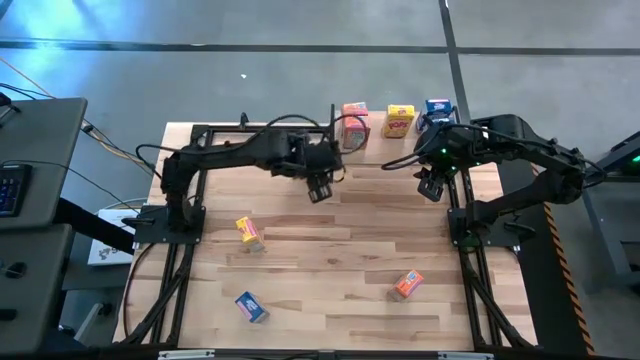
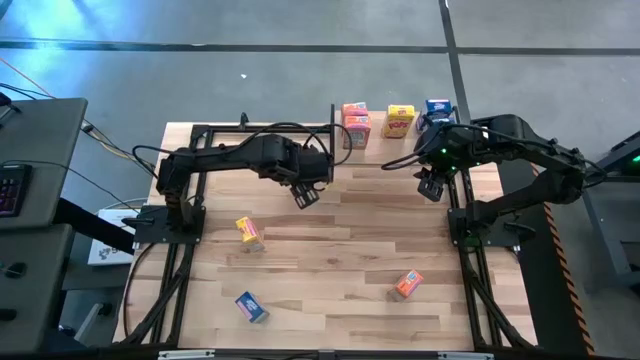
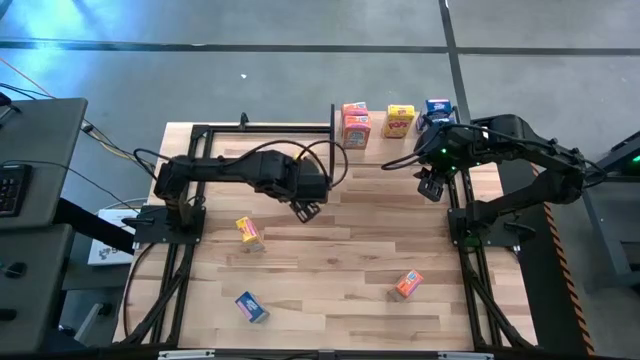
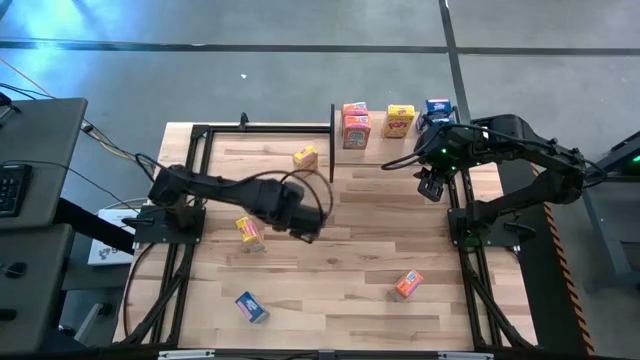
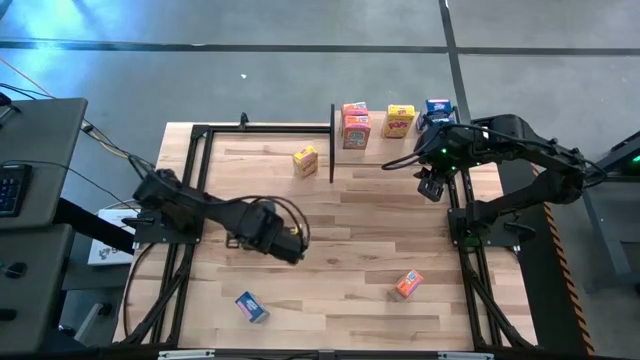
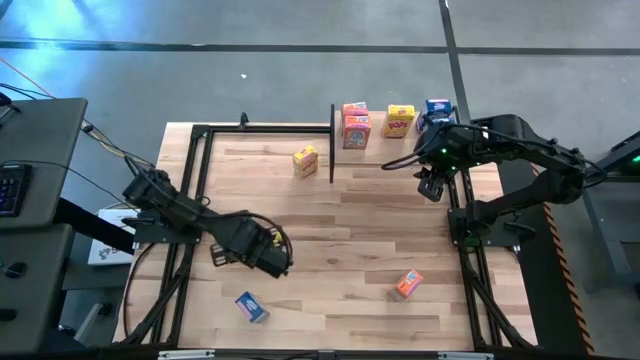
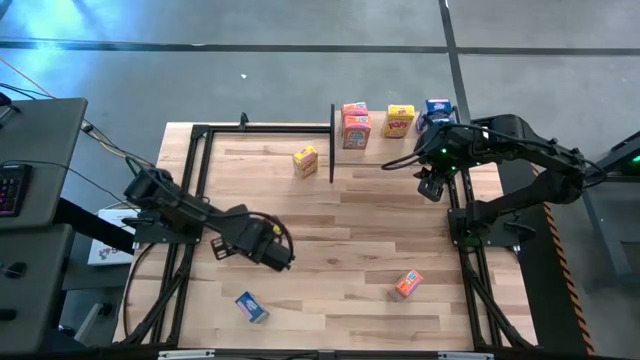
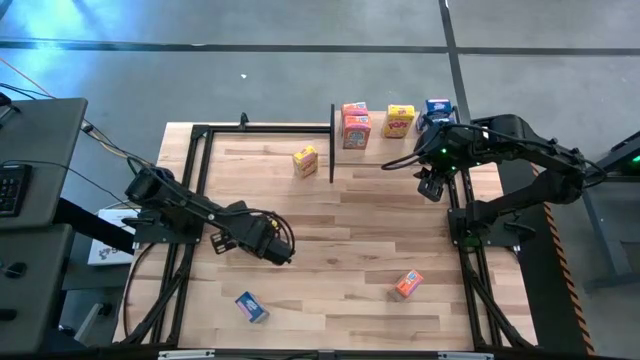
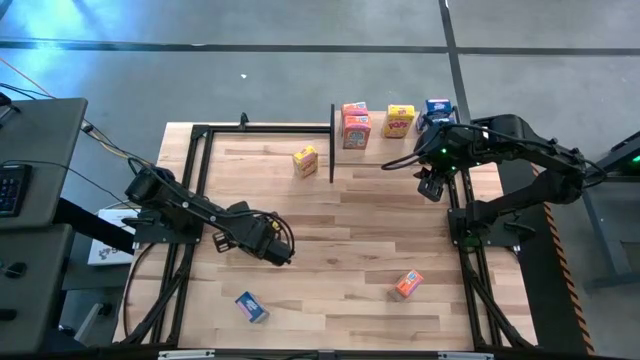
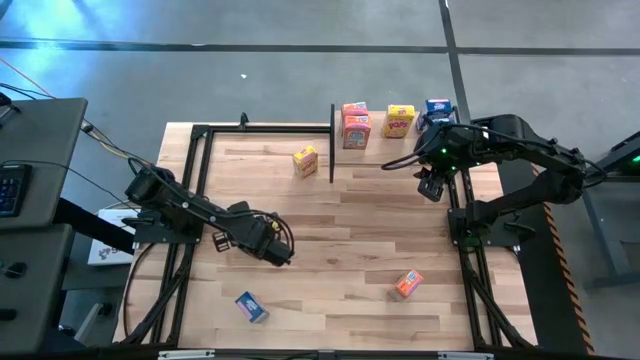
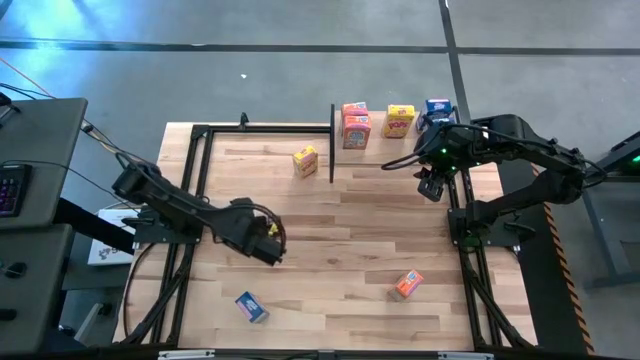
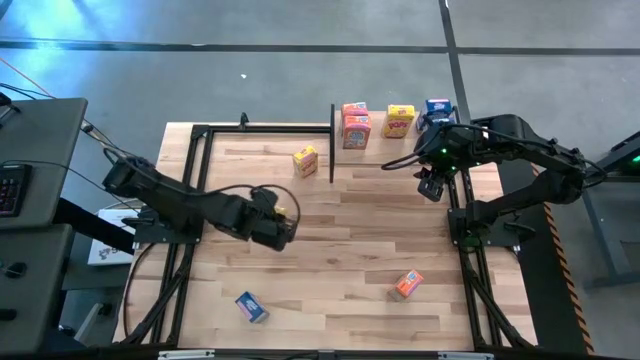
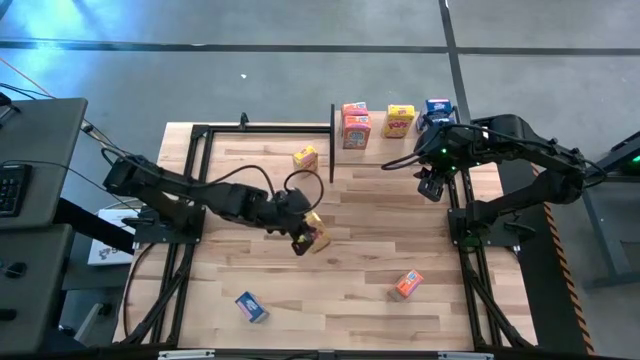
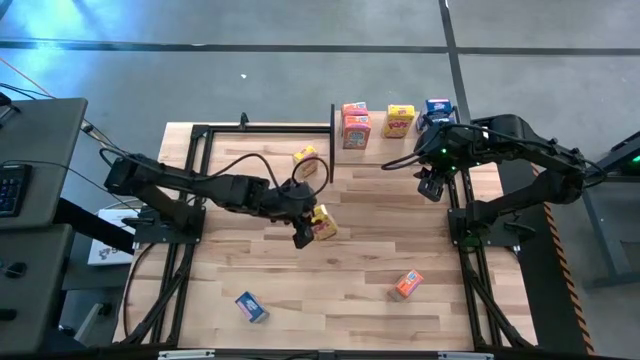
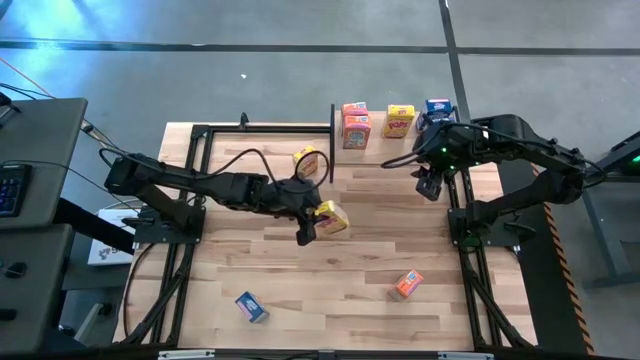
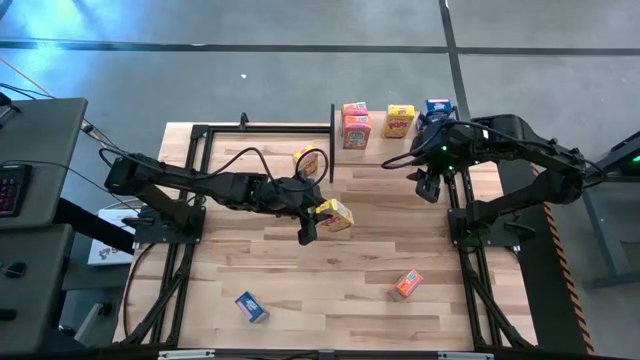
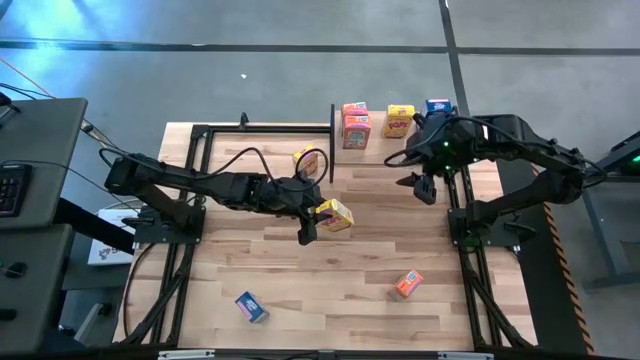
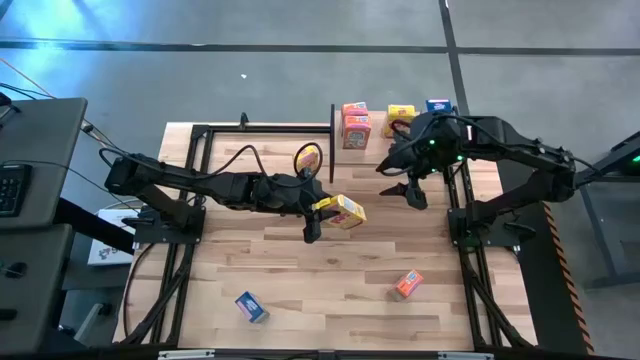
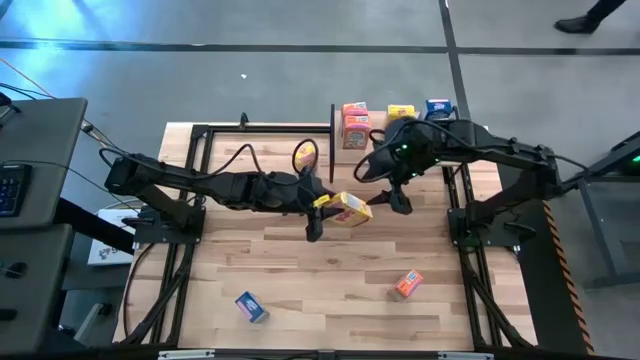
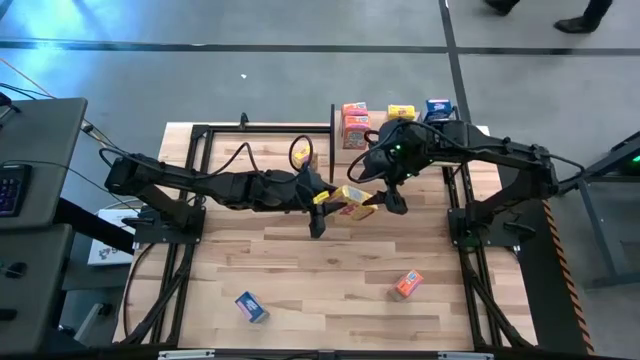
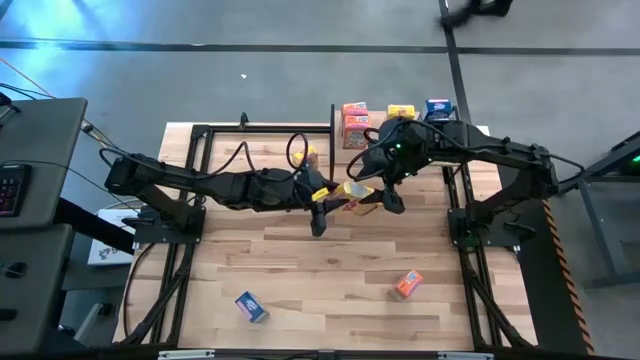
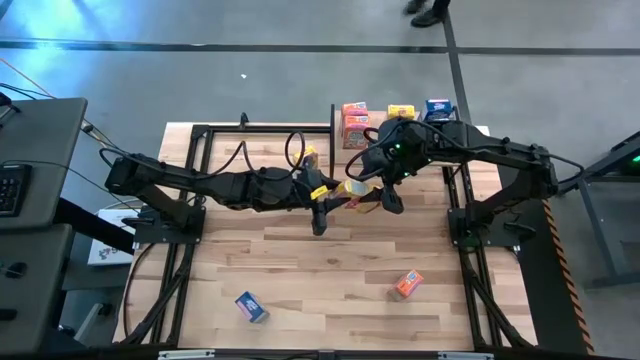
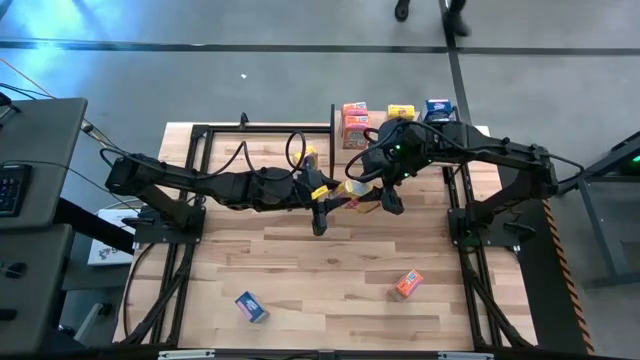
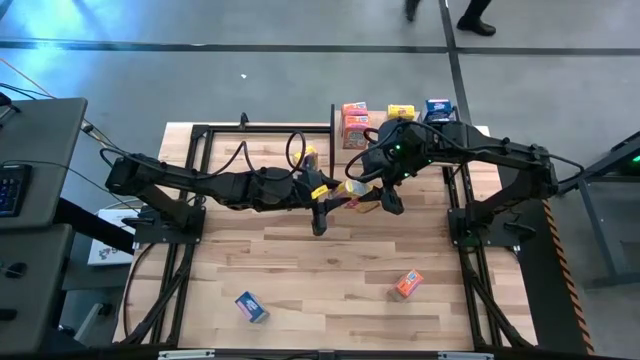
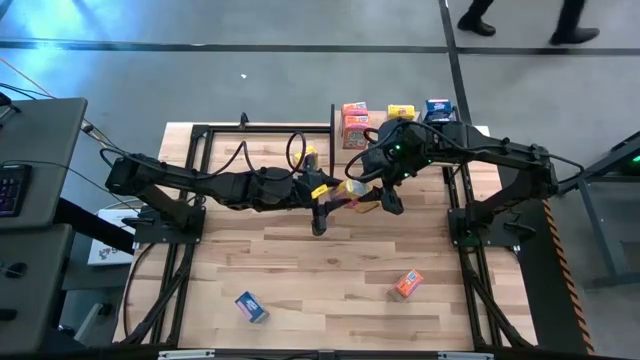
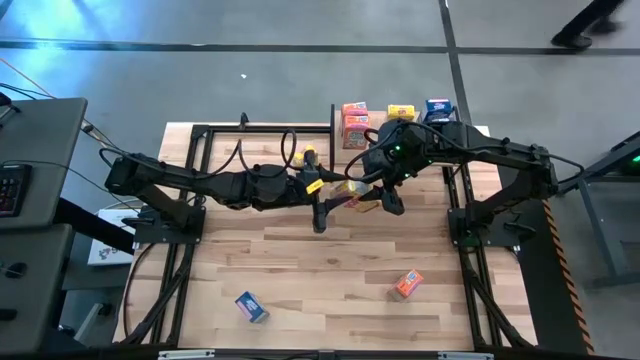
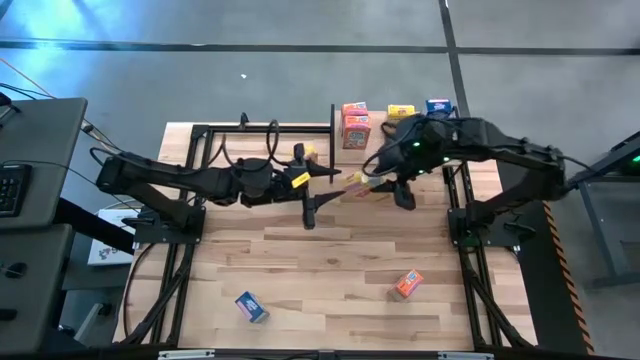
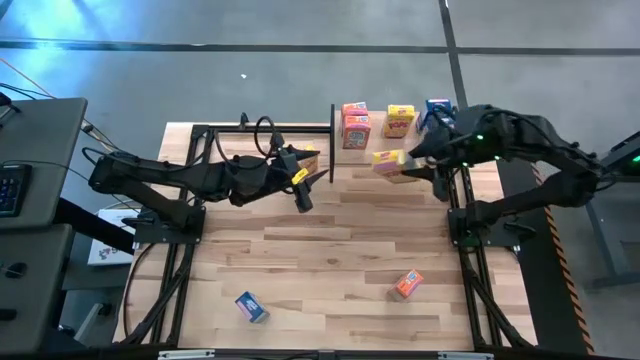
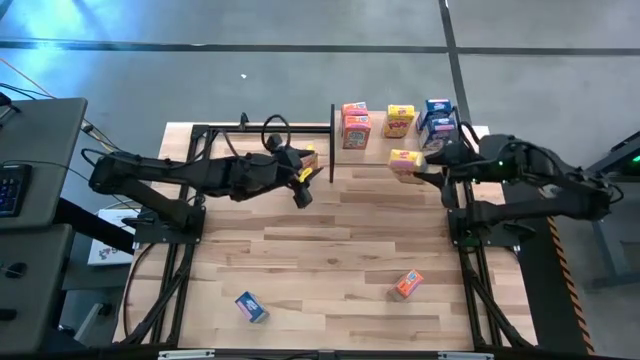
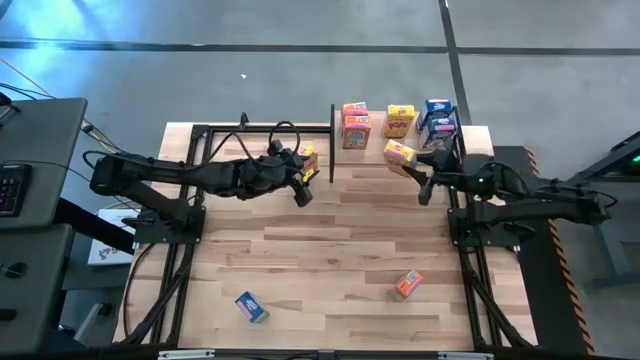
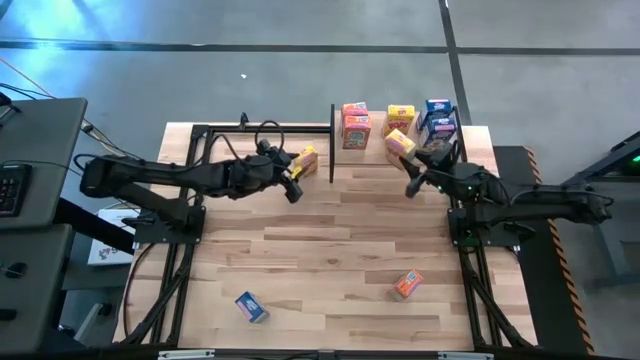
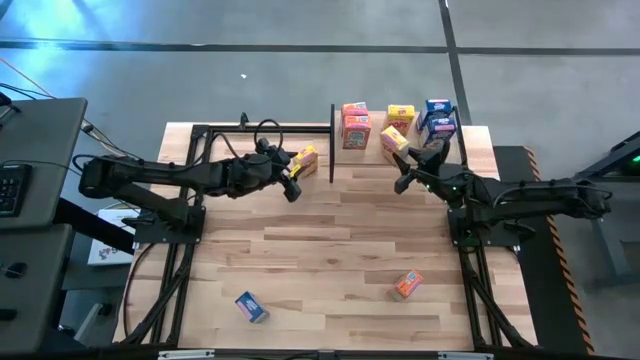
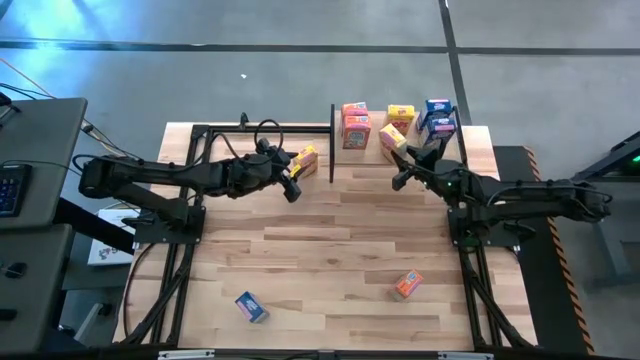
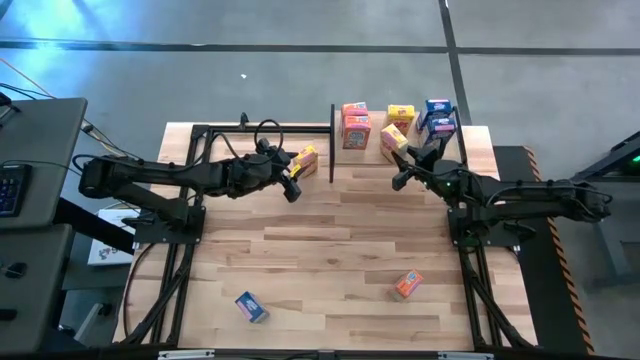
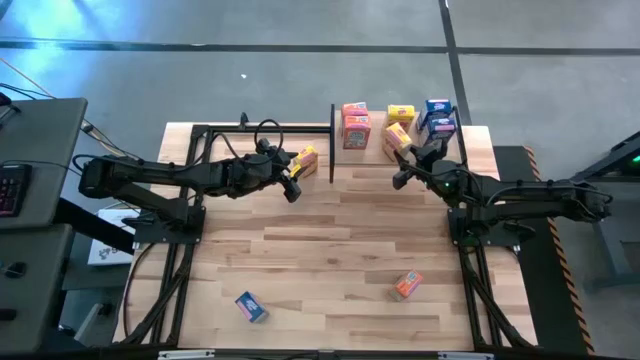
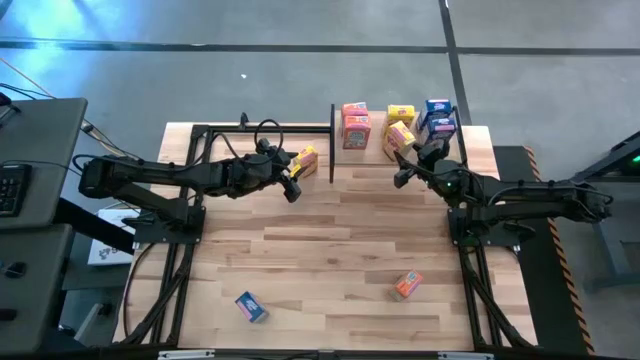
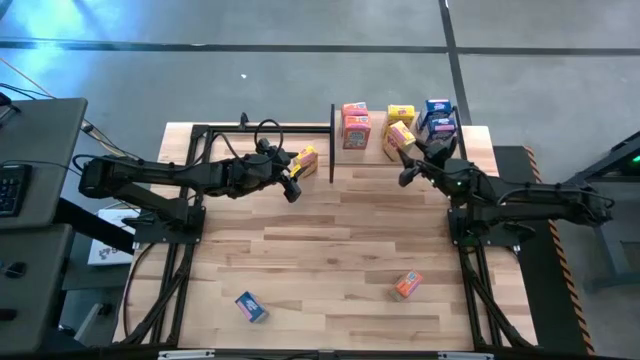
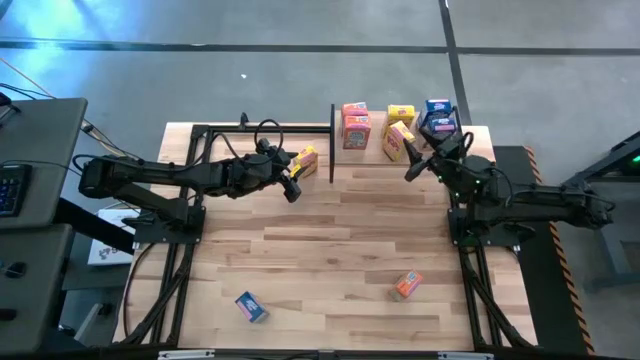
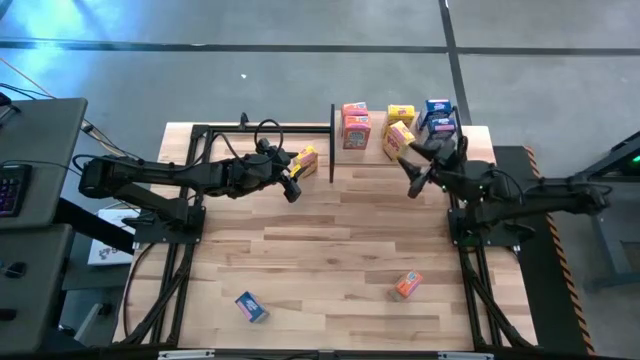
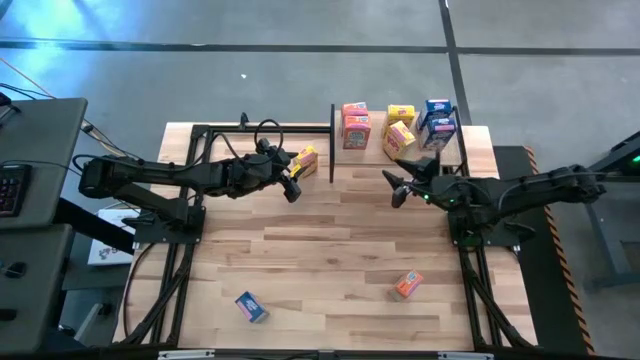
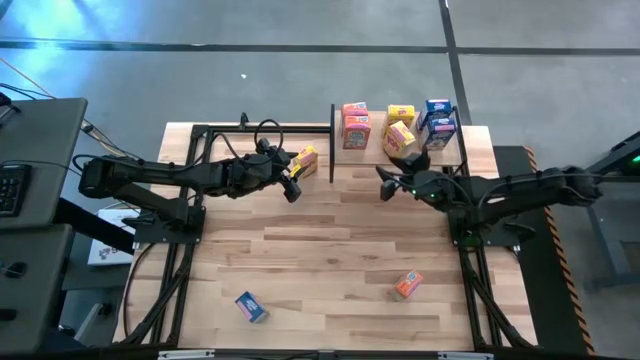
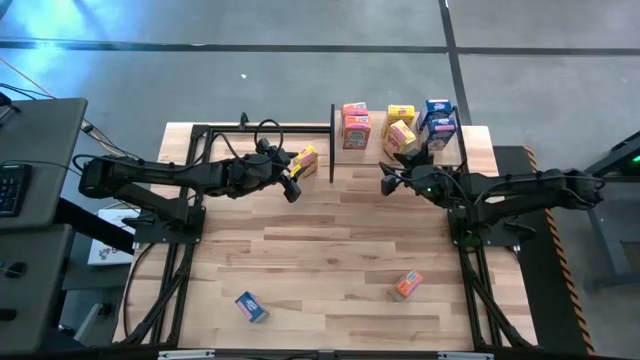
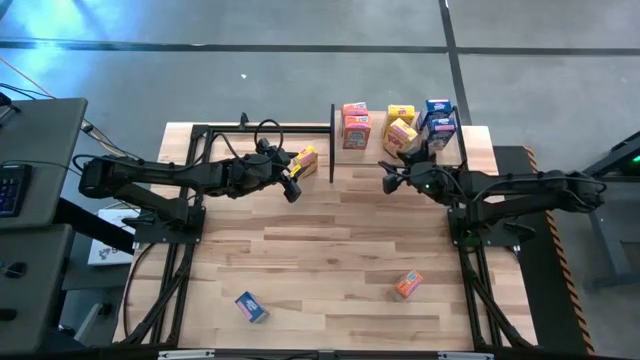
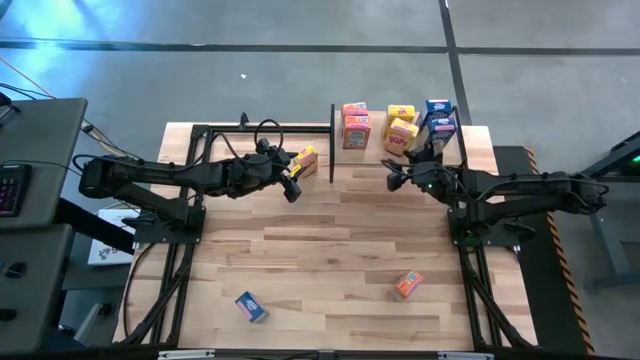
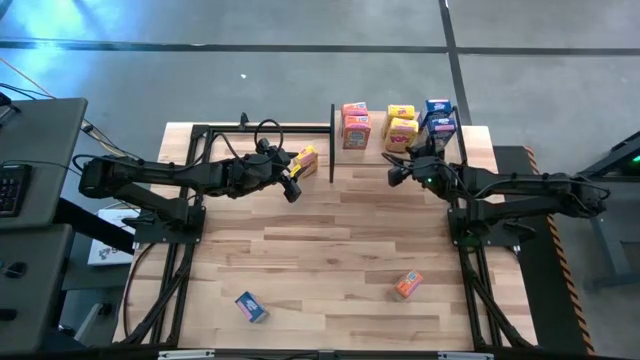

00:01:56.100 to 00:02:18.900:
Task: Stack cereal on shelf
Put the bottom yellow cereal box on the shelf aligned with the other yellow cereal box
